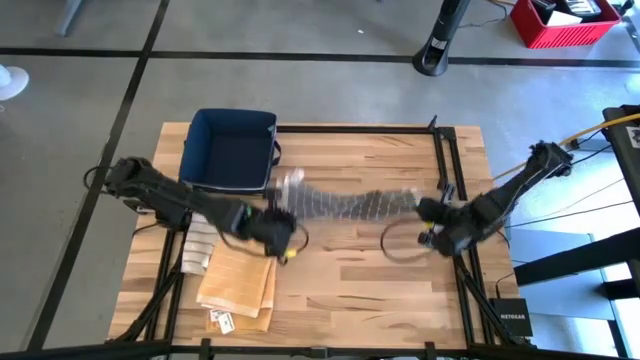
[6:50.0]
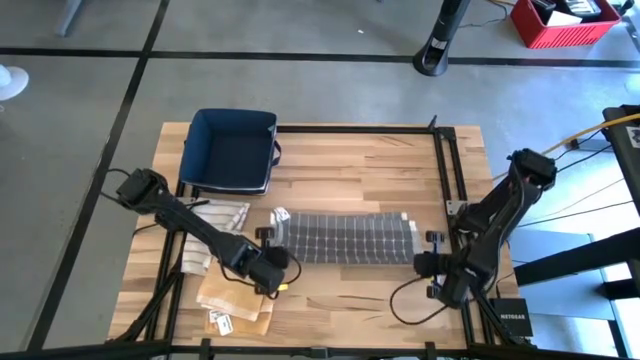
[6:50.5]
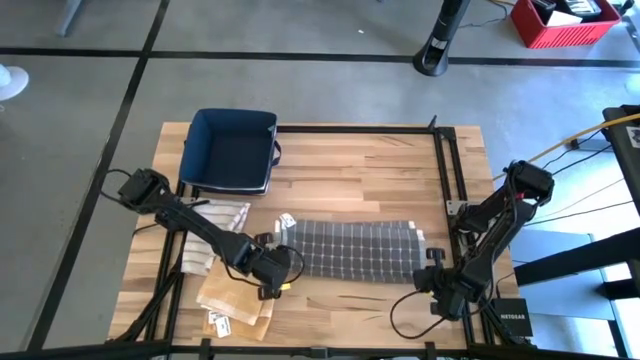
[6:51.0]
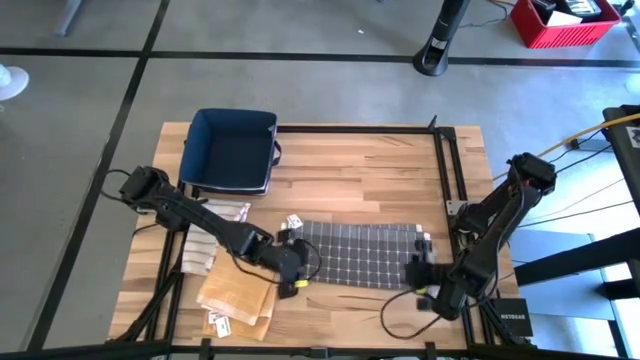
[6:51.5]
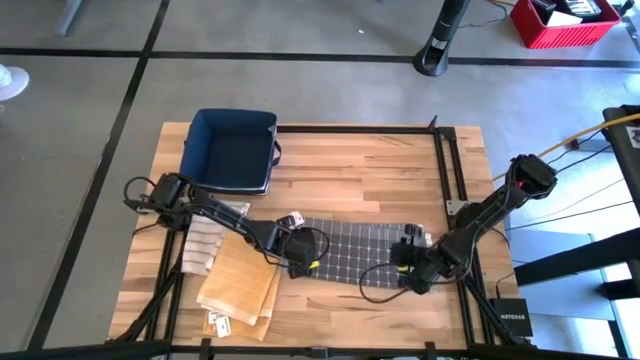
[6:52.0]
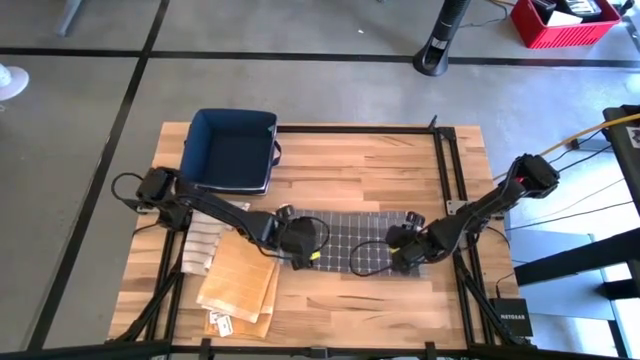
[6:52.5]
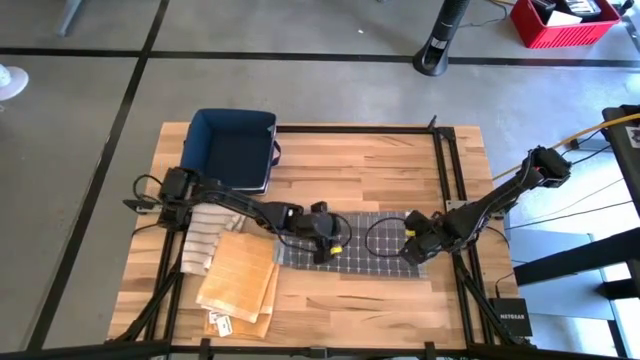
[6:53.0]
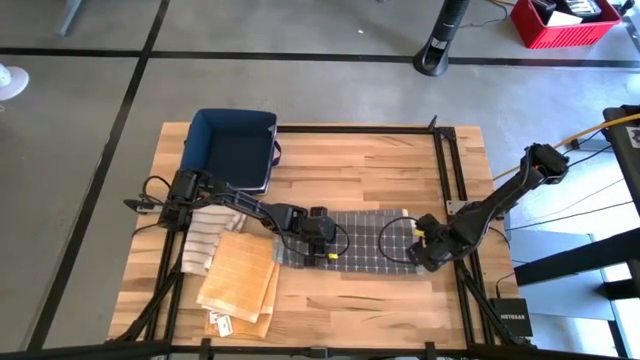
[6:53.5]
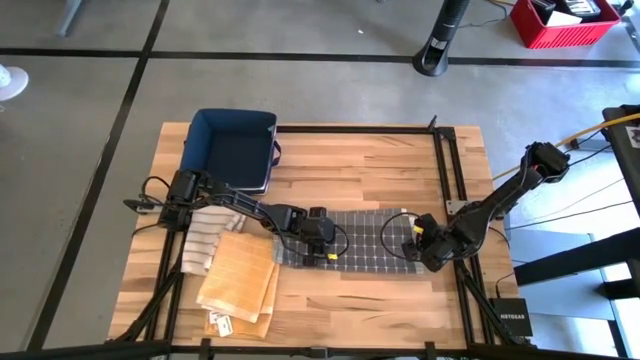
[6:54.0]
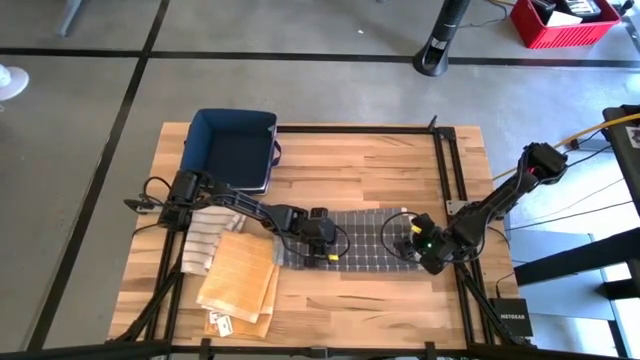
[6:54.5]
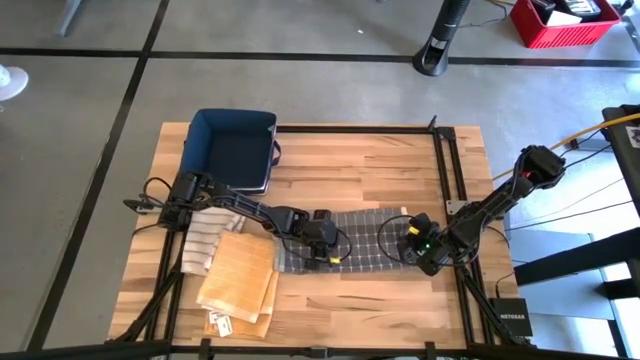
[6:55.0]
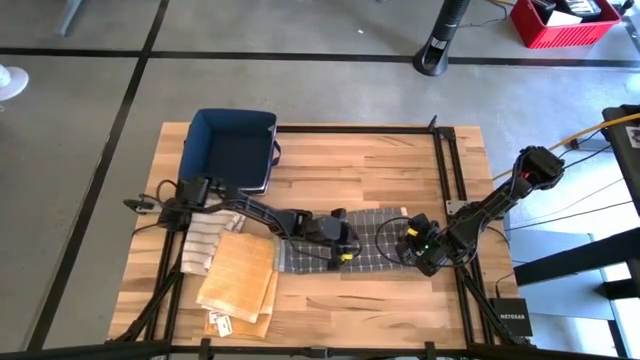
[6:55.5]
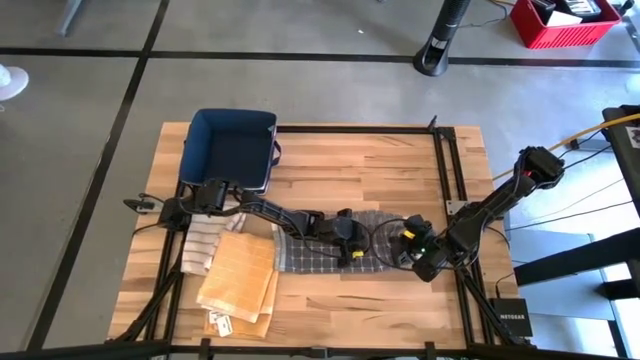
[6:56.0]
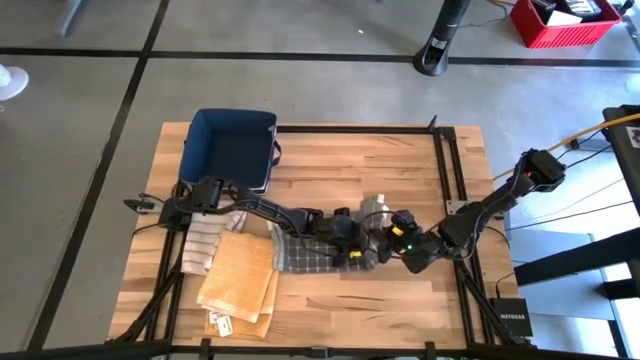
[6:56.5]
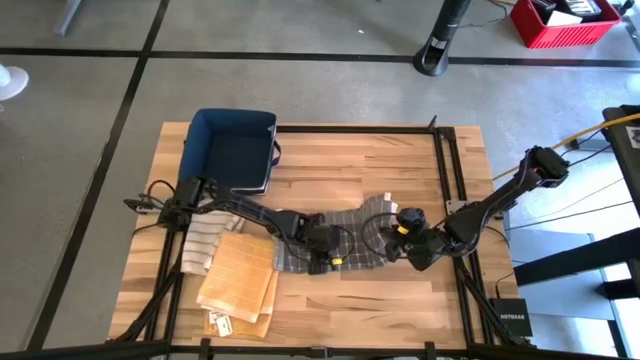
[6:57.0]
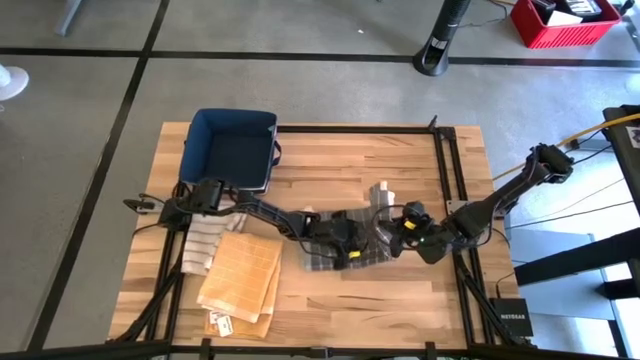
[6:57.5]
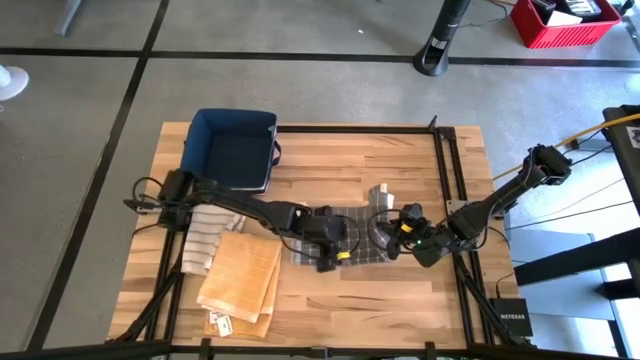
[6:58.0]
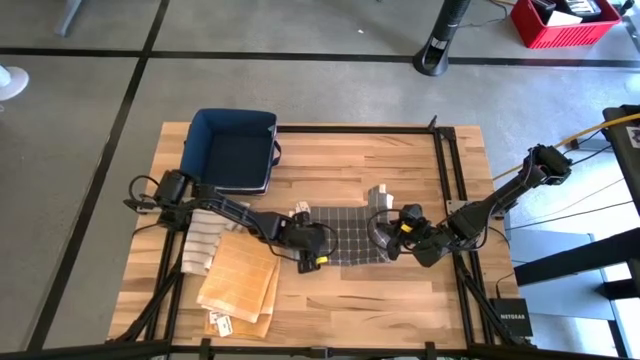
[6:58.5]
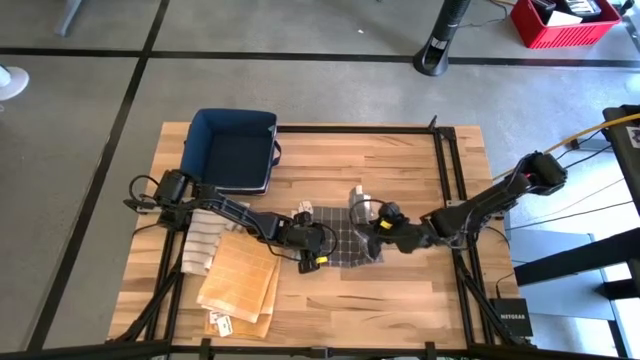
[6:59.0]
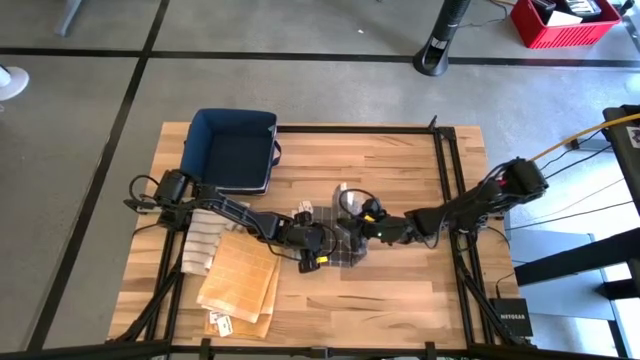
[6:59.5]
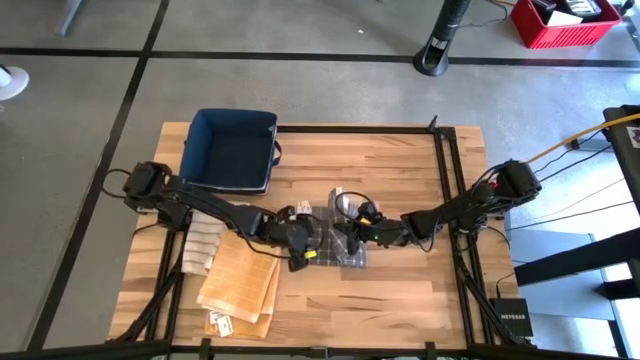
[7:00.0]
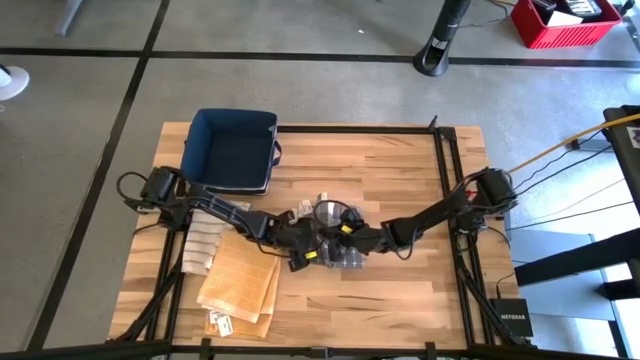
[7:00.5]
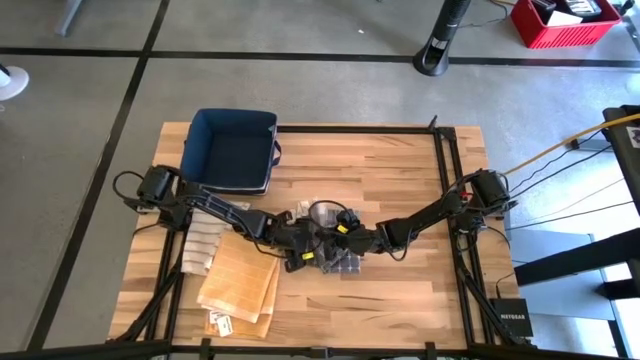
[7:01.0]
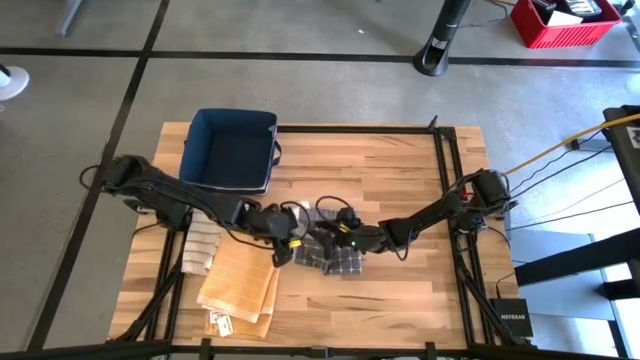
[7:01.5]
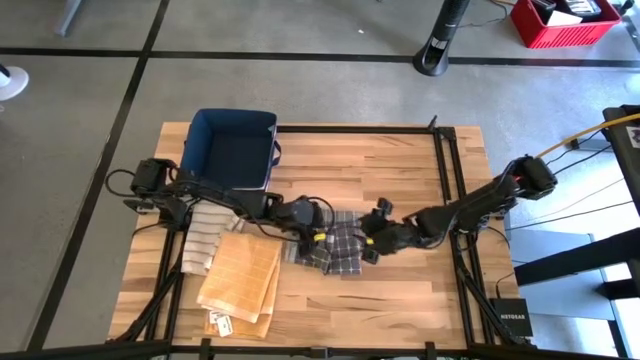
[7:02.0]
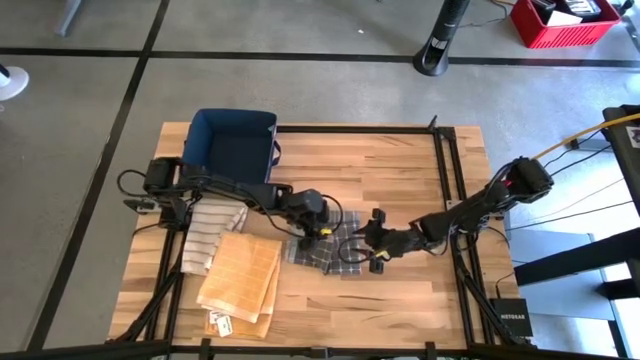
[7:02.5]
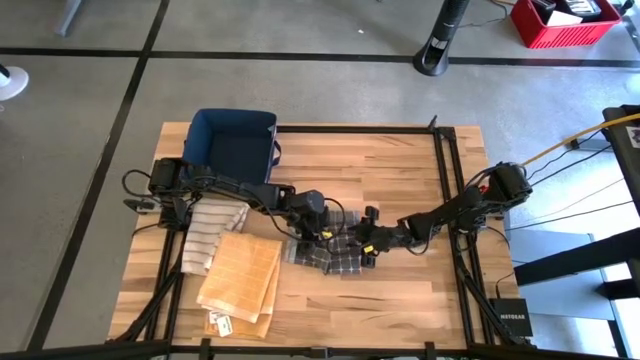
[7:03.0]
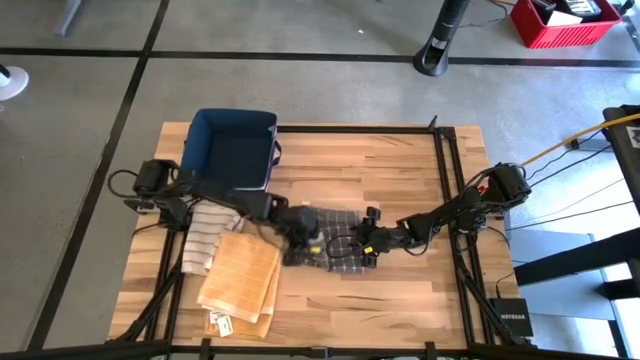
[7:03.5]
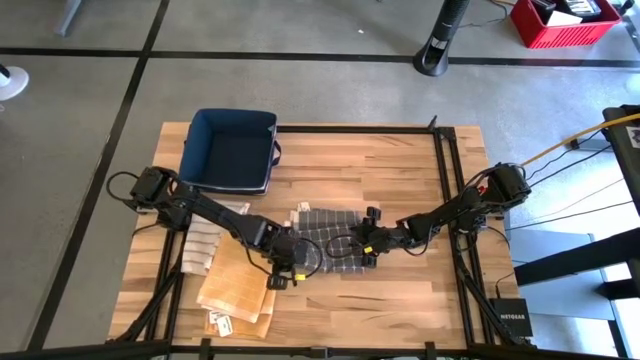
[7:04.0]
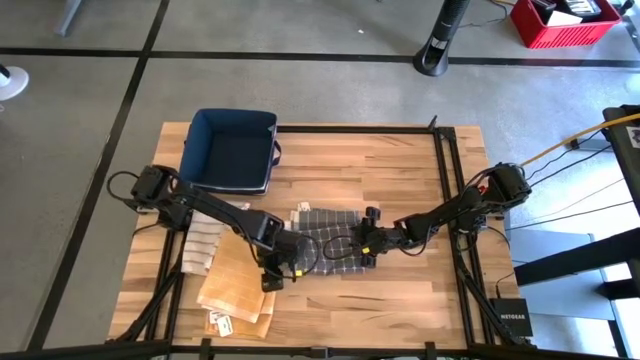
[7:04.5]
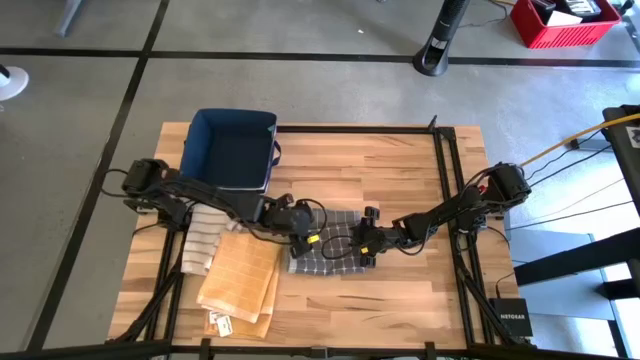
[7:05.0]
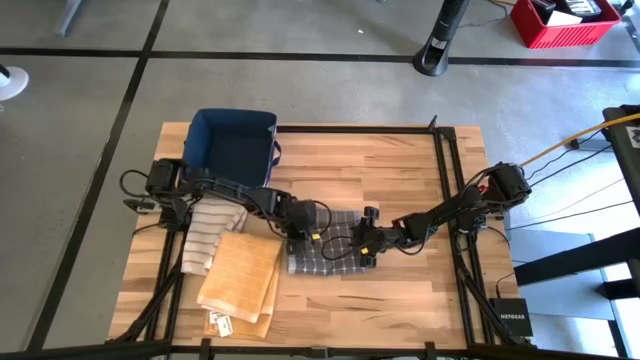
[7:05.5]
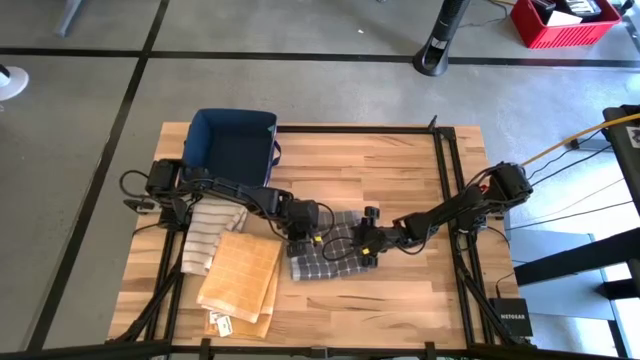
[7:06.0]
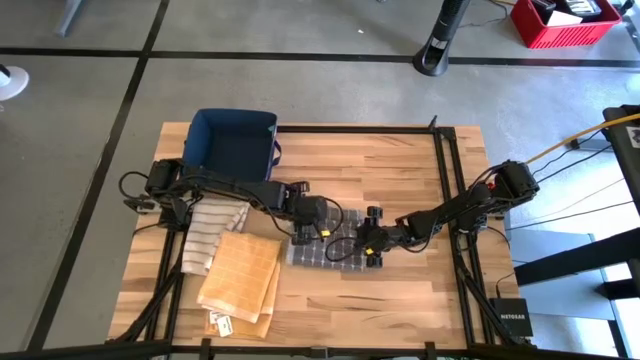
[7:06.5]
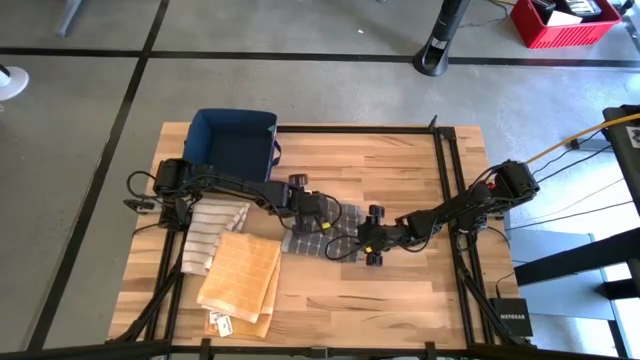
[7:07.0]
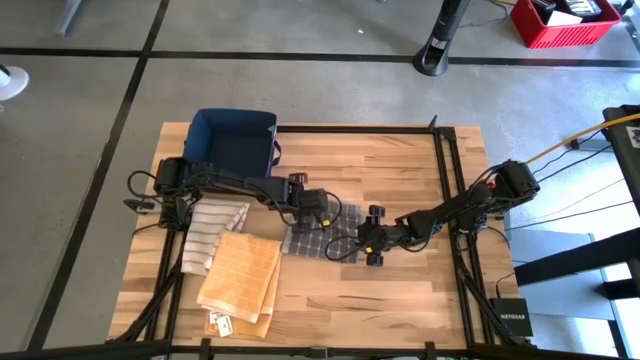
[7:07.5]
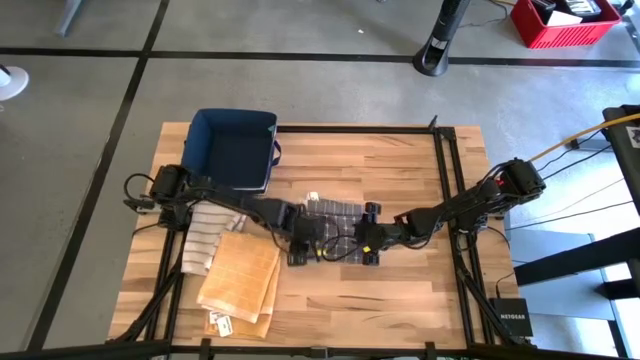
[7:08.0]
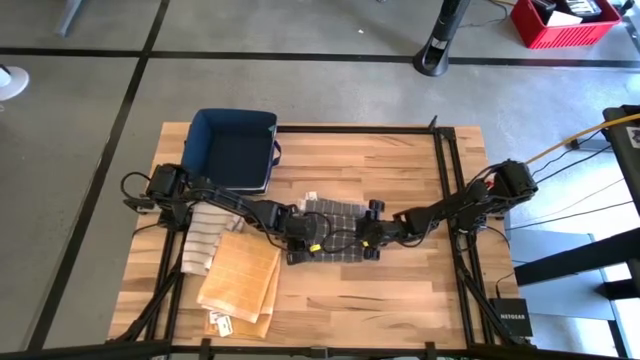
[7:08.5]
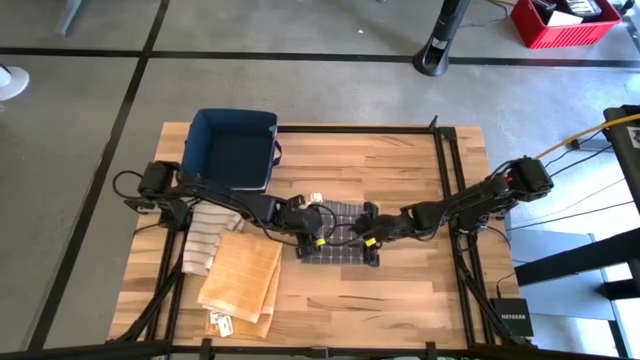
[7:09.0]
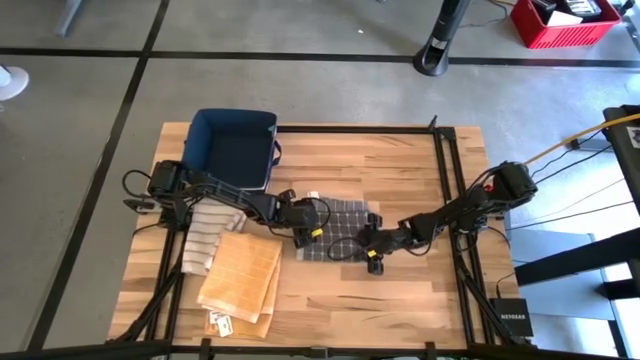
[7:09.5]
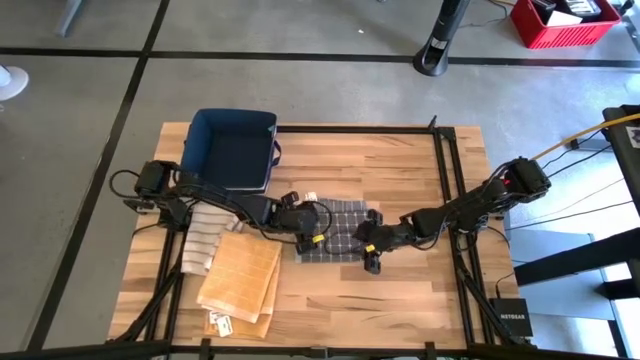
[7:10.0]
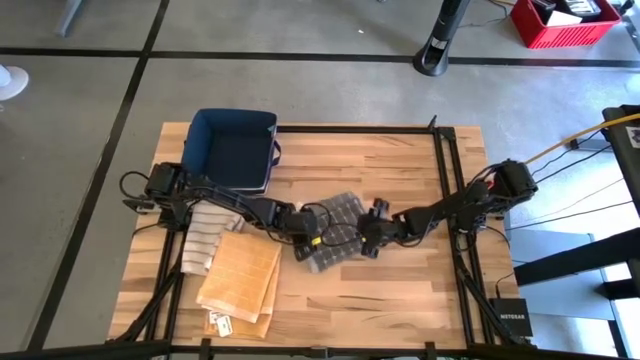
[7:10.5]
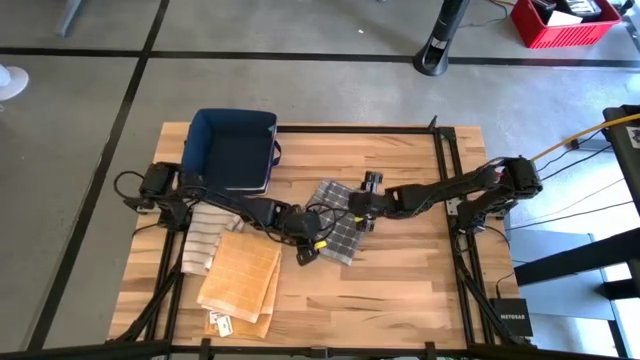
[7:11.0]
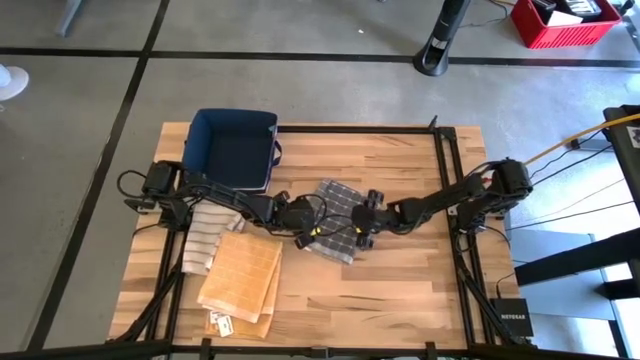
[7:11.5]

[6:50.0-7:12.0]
Task: Fold towel
Fold the gray pattern towel
